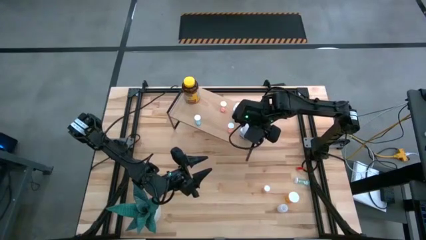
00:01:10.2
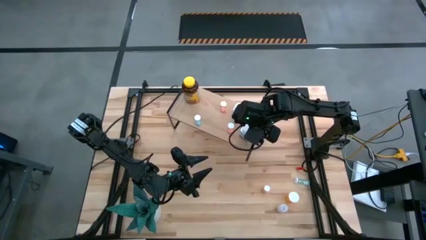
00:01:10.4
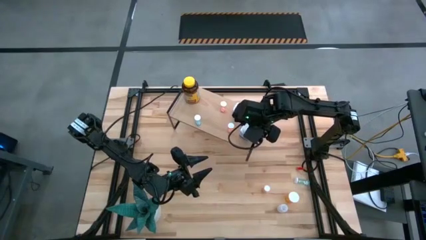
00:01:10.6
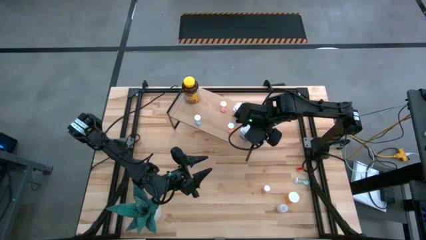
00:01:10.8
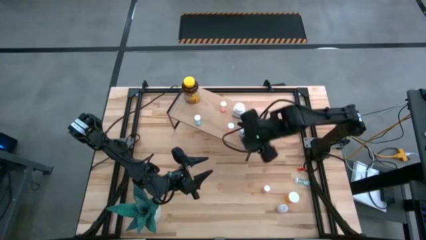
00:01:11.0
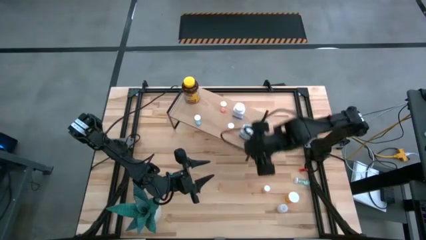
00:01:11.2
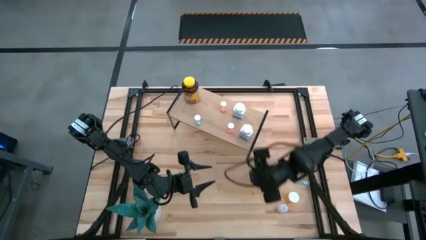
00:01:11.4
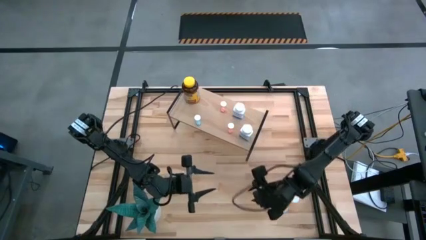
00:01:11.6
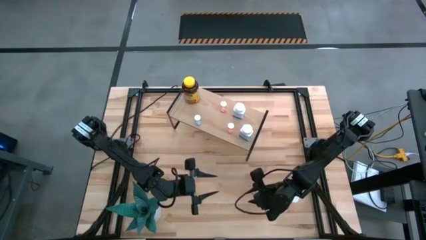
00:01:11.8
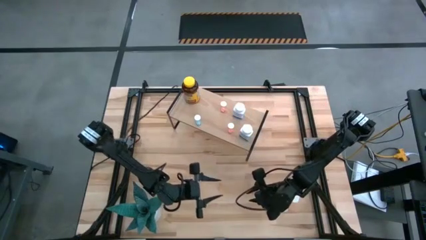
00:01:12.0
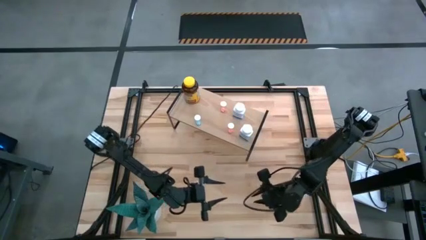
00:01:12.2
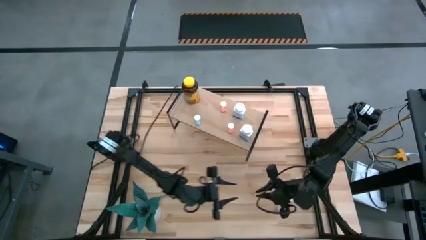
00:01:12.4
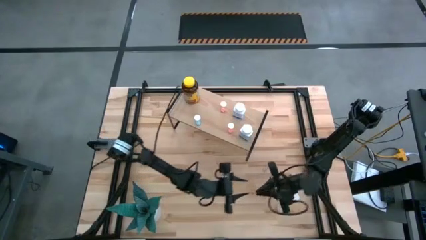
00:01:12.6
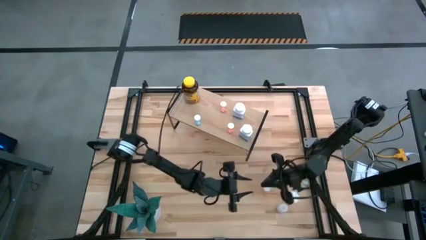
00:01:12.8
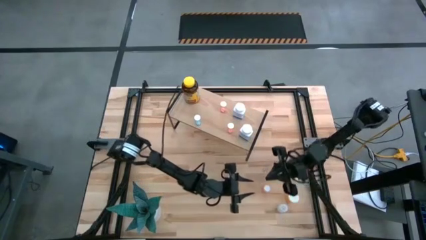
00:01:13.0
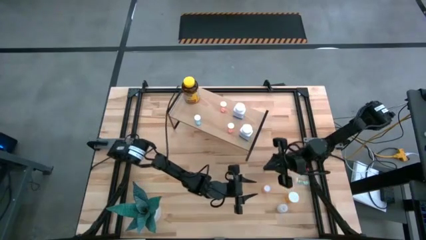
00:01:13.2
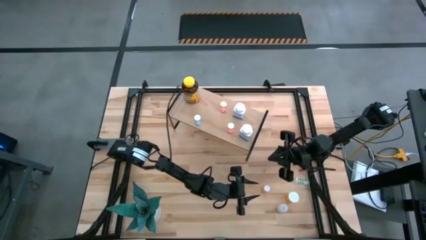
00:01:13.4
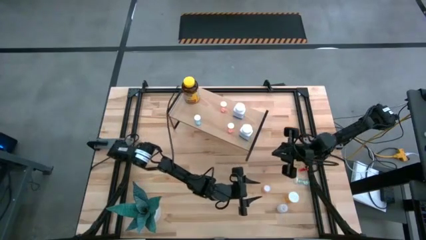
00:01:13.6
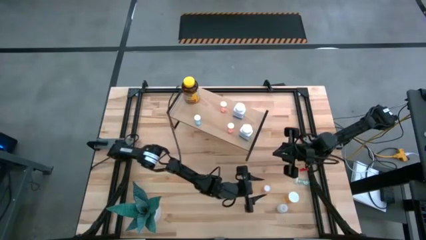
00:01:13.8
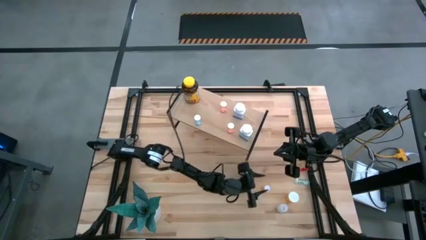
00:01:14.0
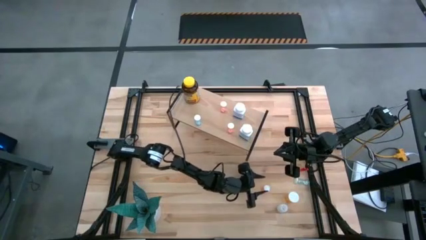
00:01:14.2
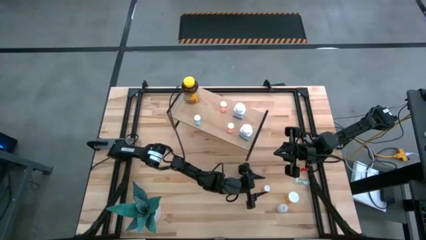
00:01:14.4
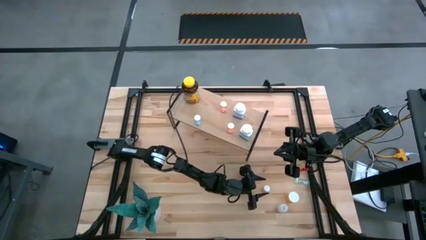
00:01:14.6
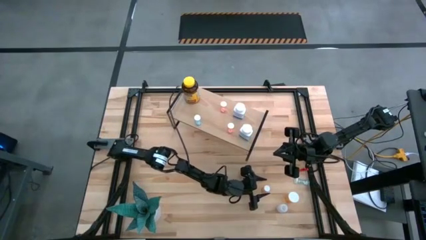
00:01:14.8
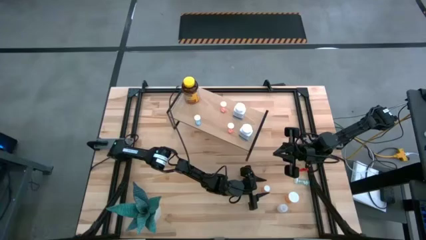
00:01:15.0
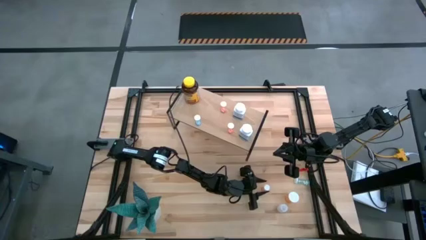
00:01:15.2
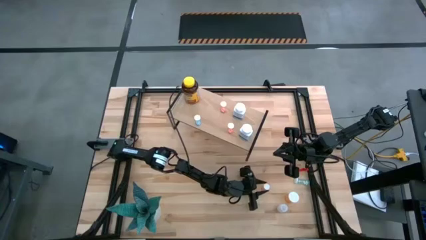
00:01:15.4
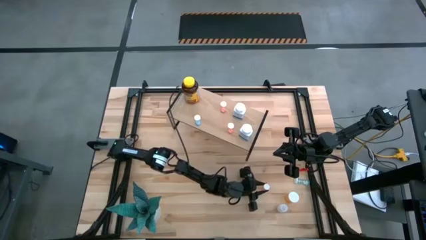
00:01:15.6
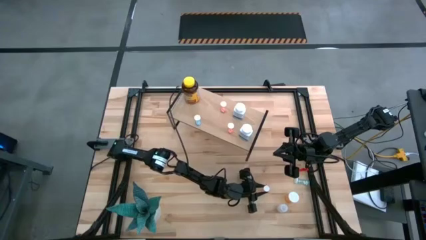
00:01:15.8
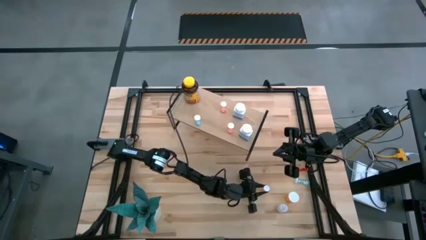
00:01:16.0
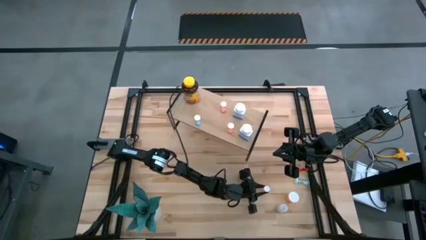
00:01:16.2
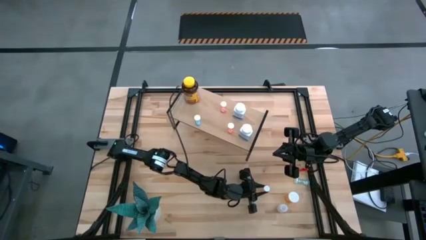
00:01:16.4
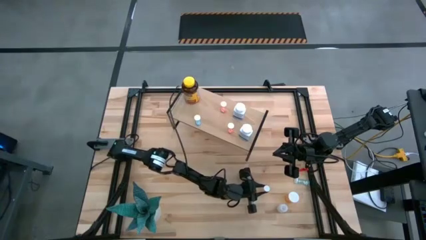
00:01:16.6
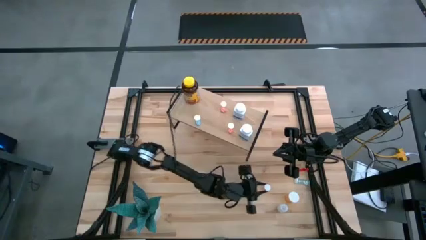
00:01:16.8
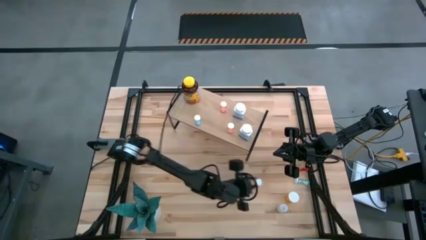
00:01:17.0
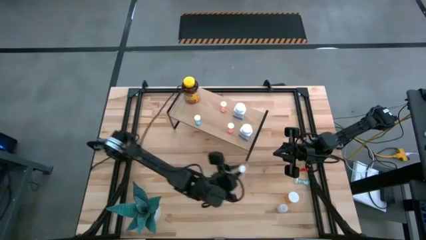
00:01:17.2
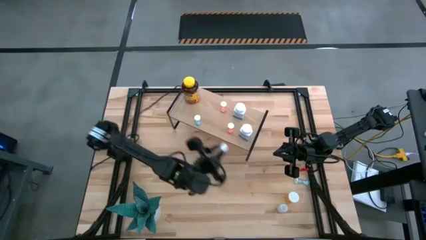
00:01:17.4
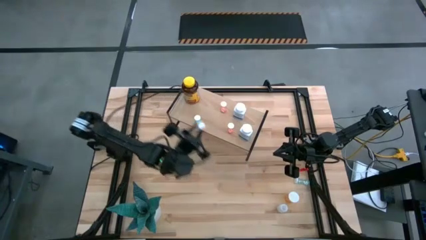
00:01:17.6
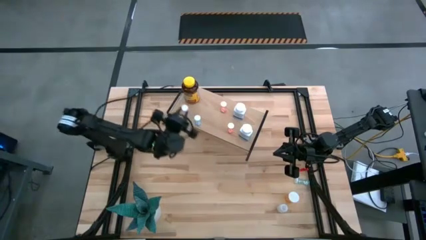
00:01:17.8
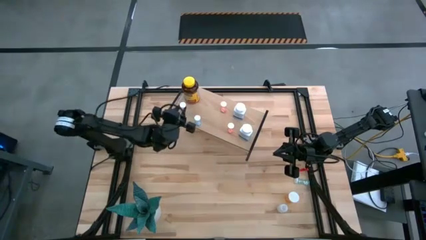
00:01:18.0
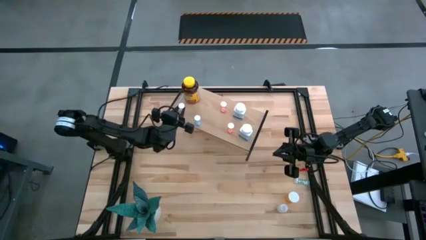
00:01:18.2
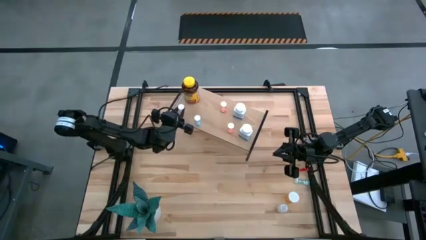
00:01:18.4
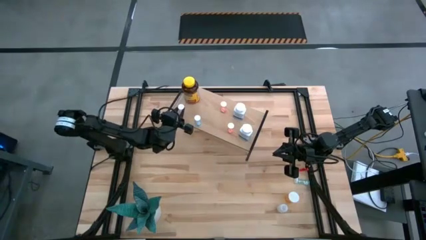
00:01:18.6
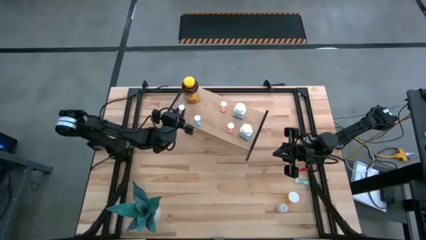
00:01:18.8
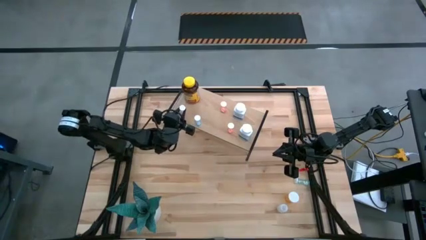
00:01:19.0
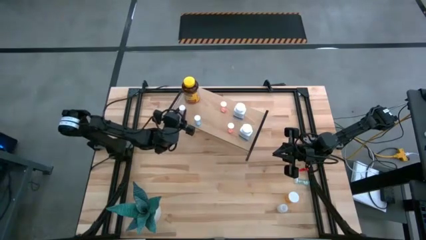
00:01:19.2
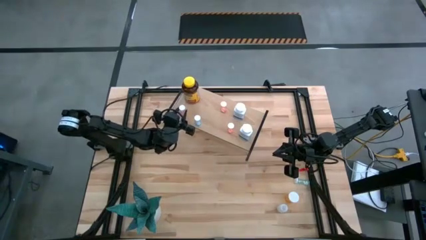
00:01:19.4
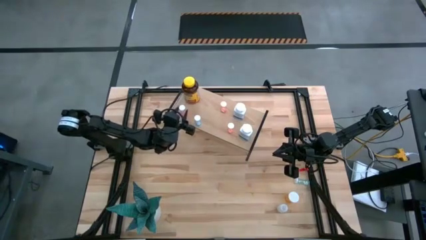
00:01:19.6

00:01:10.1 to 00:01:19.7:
Task: Pick and place medicine bottles onto shelf by color
Put the red pill bottle on the shelf

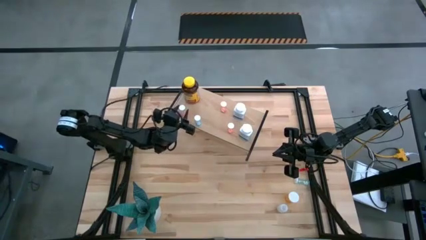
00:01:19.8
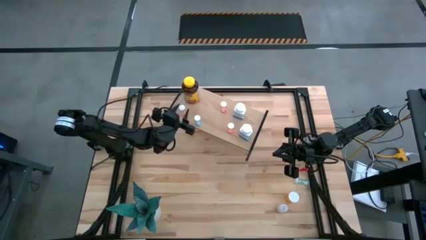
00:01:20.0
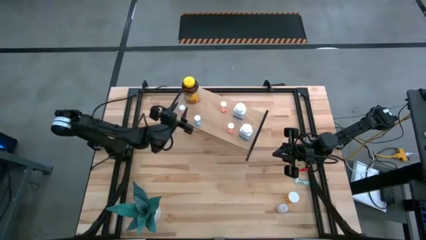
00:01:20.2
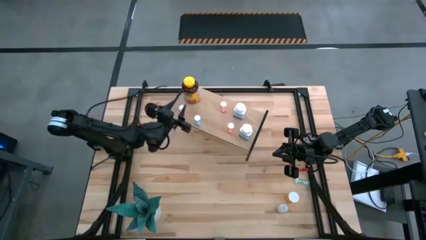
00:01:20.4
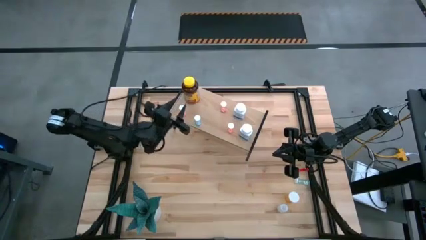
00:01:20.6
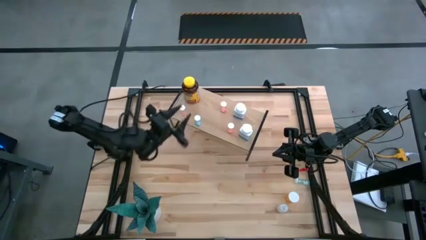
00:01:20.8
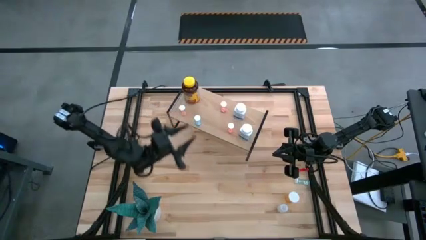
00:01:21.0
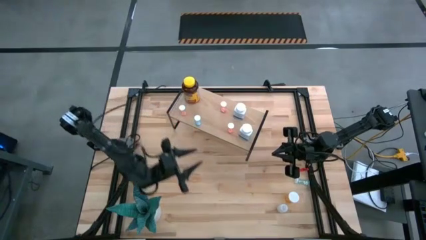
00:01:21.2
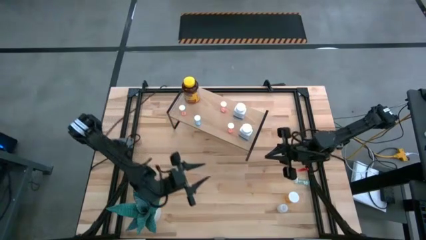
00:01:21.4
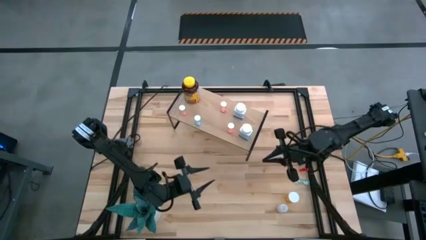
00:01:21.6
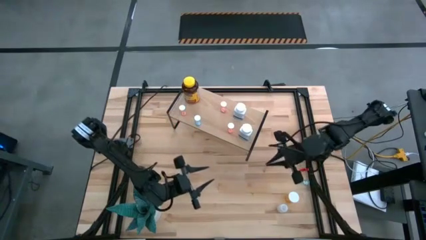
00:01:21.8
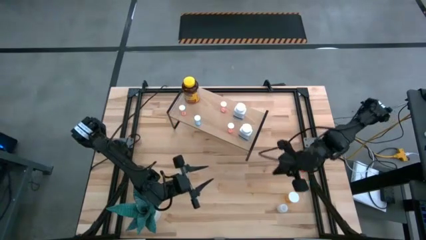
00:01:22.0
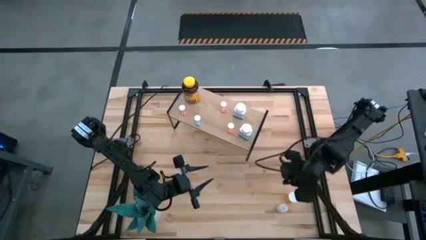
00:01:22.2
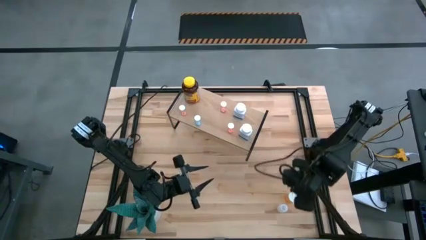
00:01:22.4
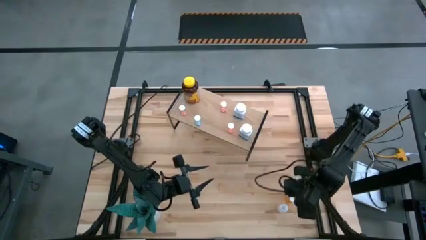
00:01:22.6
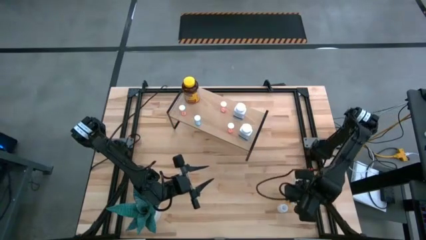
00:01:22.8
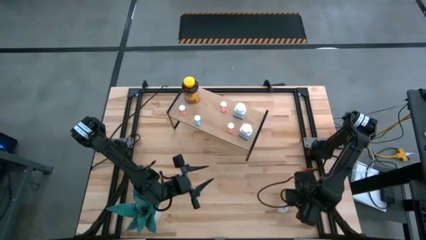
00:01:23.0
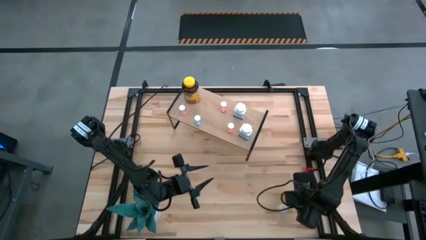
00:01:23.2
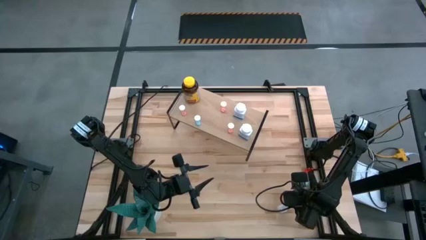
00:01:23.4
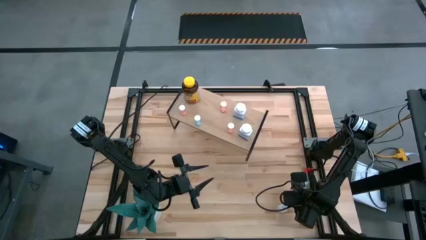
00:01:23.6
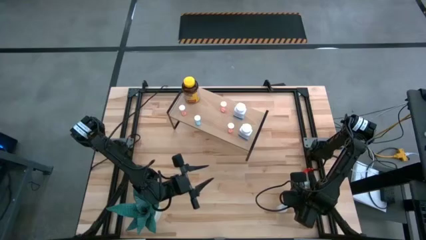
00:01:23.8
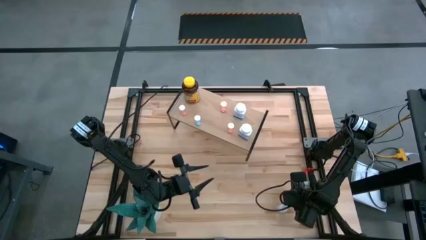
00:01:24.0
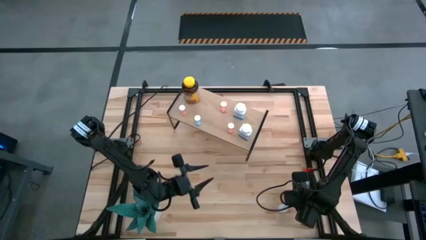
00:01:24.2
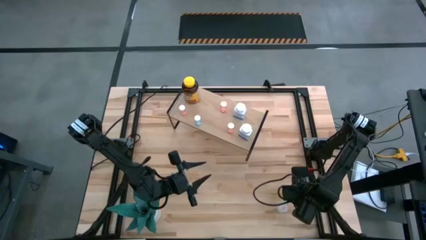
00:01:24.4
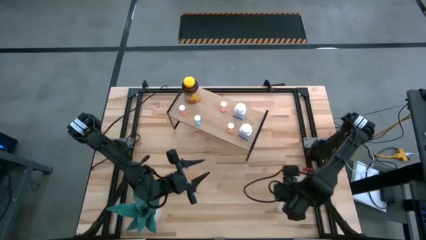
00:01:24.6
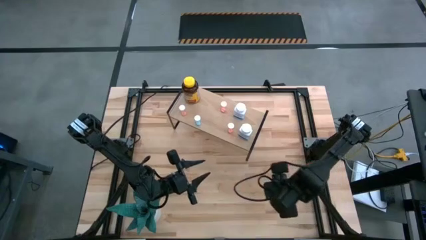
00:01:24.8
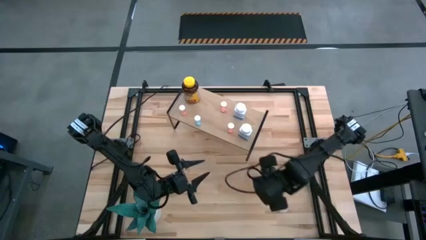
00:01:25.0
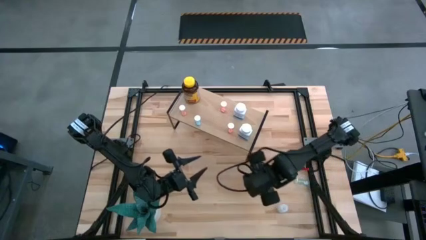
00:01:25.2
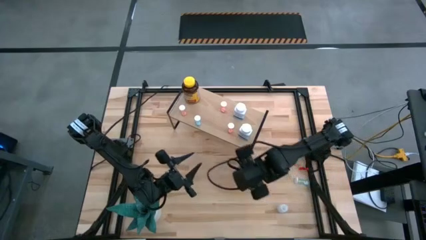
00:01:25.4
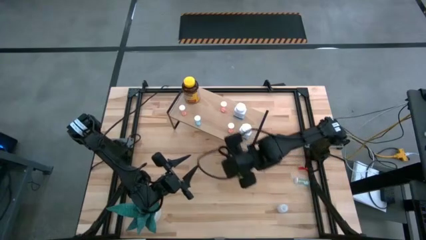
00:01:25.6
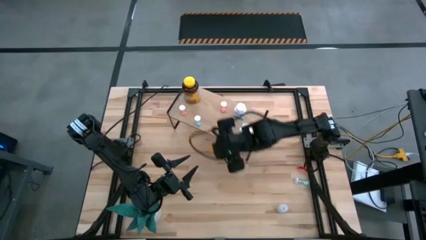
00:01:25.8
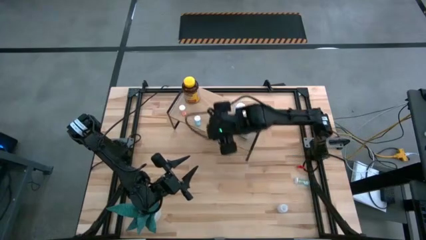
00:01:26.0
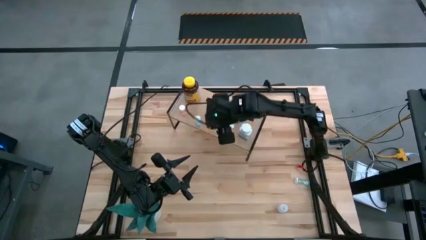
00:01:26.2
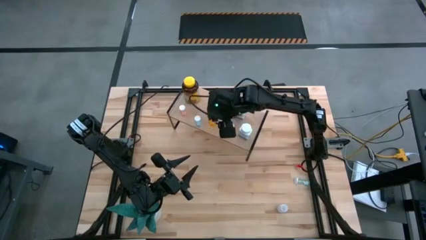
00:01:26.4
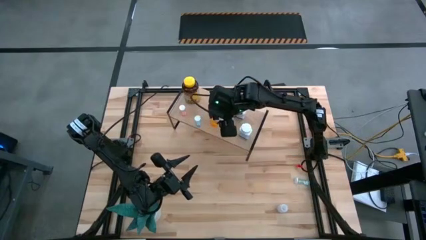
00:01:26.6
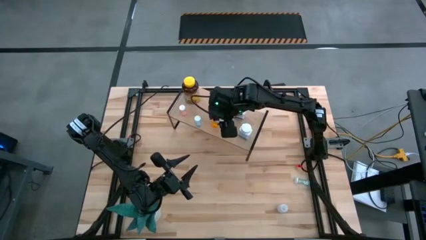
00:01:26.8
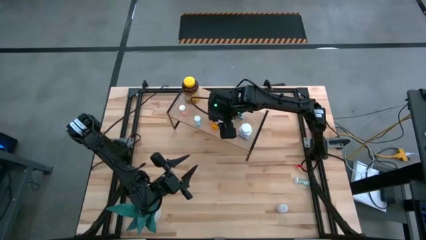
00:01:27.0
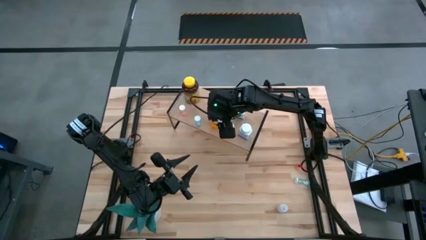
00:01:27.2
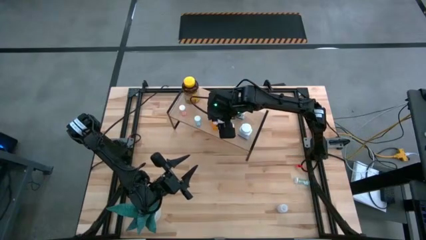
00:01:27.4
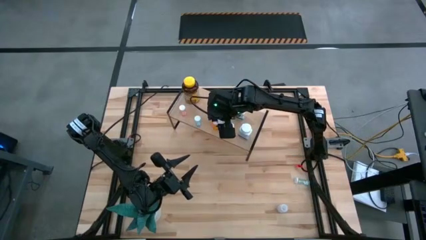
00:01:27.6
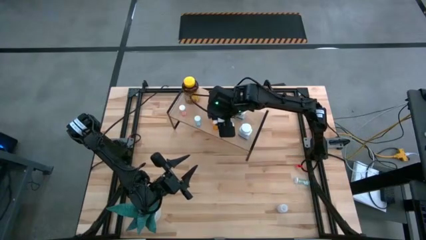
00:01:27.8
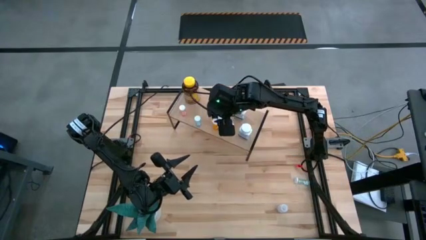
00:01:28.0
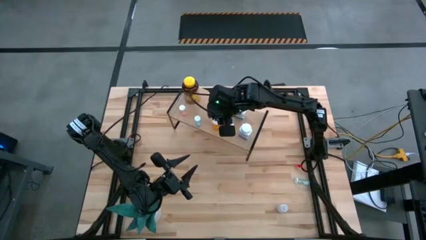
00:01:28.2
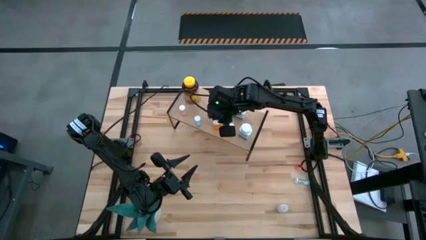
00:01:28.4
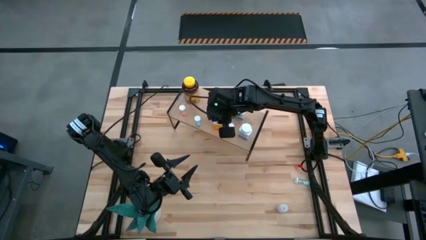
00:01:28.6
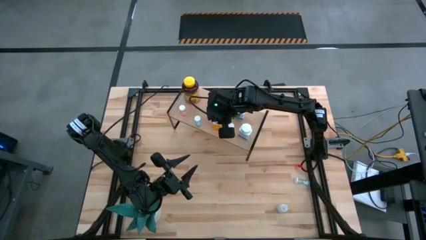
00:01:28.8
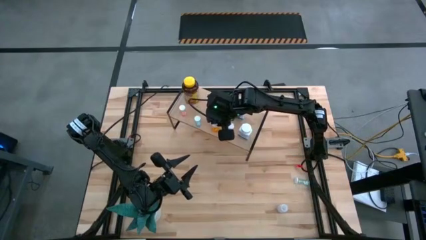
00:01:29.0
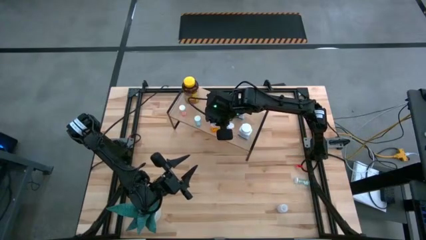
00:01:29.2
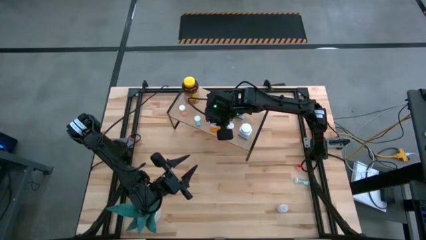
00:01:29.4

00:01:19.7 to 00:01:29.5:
Put the orange pill bottle on the shelf
